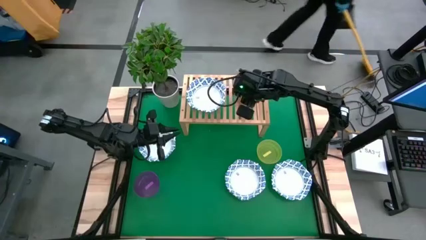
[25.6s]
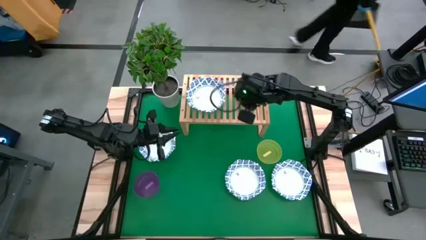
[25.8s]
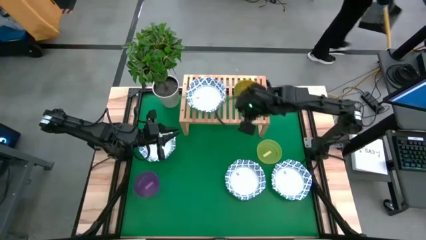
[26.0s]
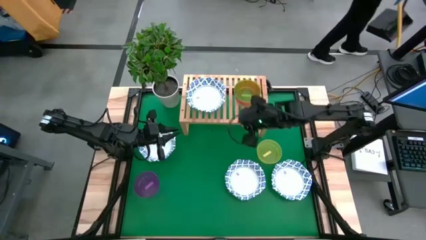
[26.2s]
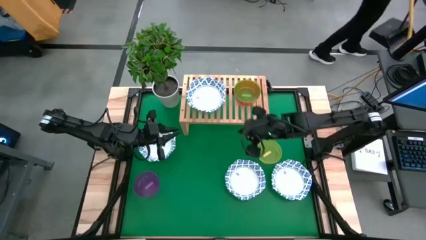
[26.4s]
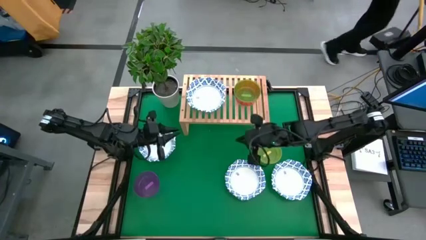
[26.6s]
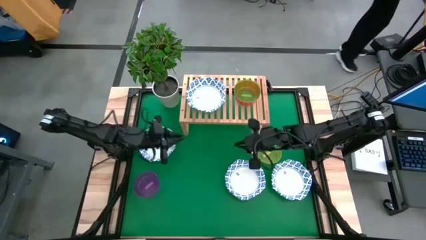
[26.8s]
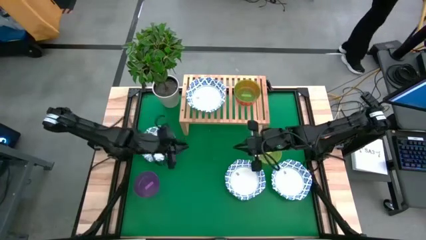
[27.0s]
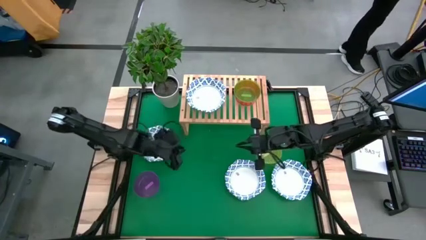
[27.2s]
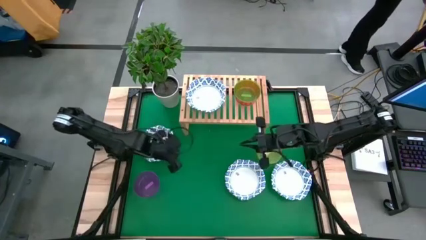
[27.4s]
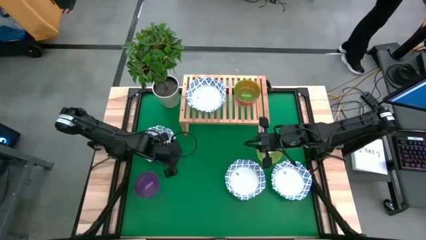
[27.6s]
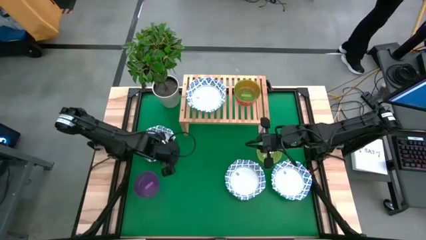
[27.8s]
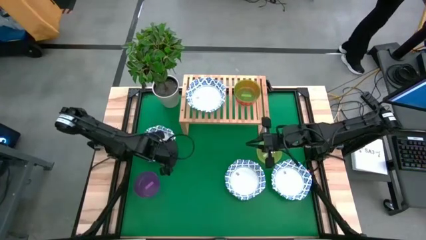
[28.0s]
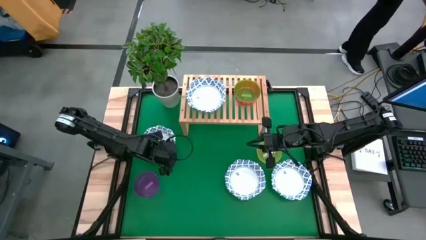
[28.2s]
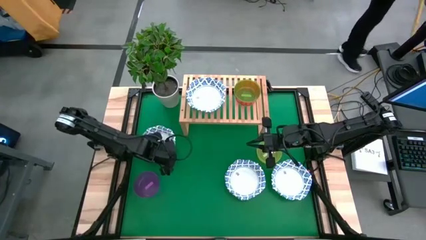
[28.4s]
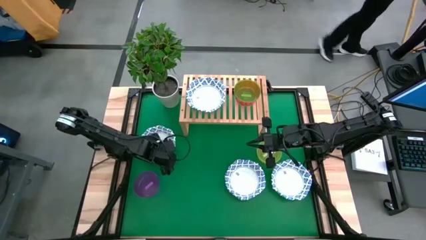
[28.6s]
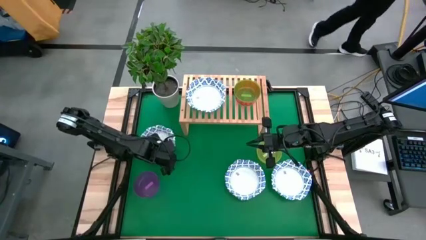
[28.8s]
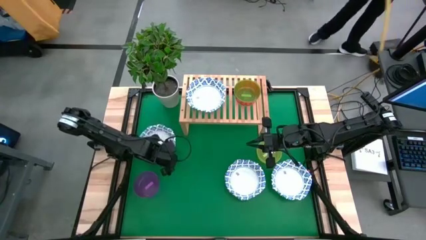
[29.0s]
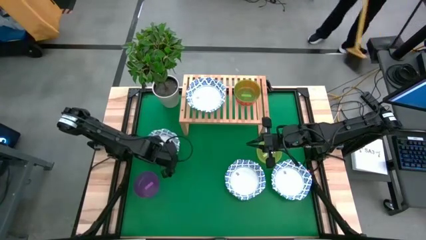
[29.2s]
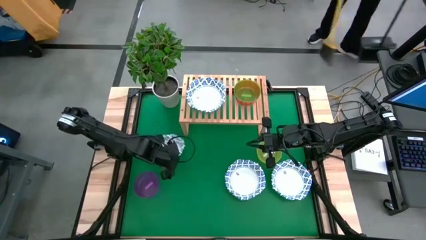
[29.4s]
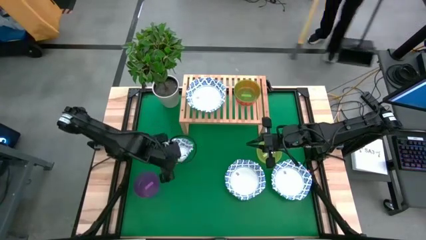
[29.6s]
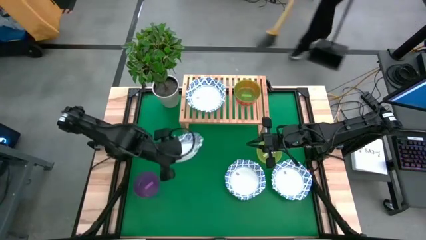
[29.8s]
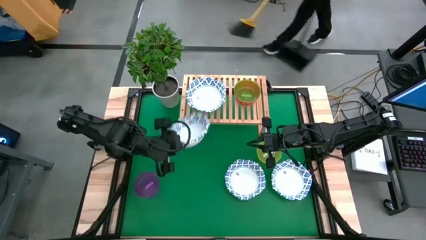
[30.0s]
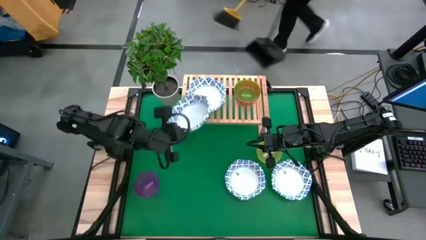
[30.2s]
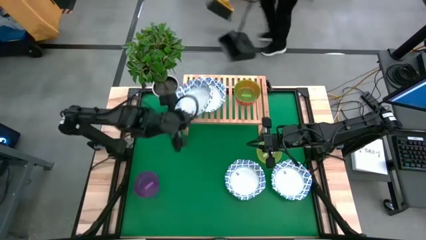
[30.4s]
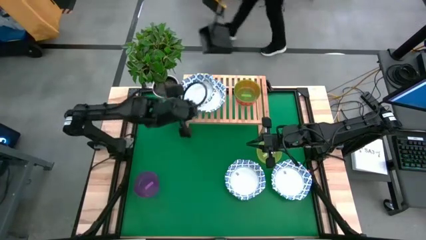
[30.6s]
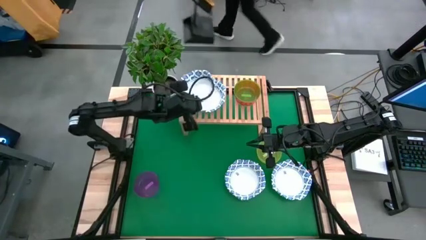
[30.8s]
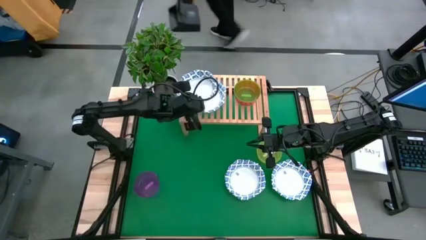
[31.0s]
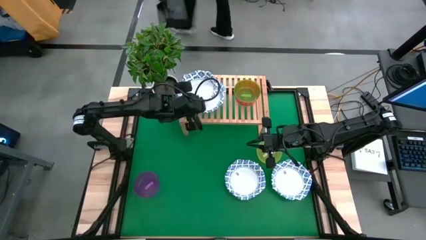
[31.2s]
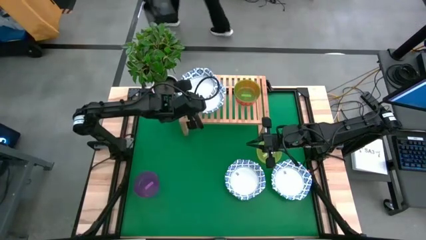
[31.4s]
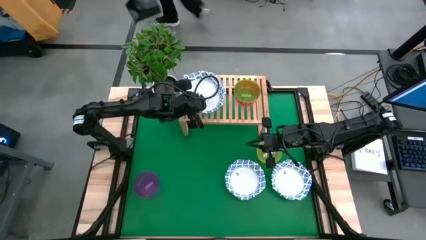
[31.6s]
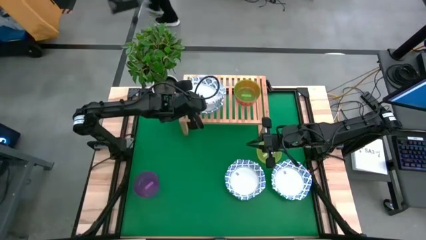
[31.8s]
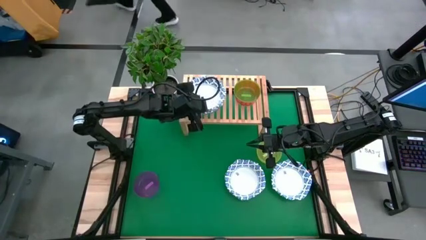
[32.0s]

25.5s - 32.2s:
Task: Place and stack bowls onto a shelf
Stack the white and blue bowl on top of the white and blue bowl

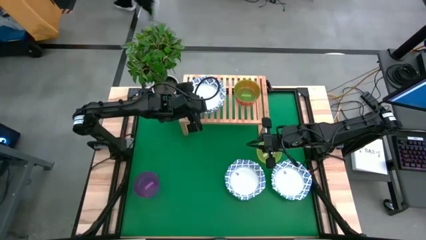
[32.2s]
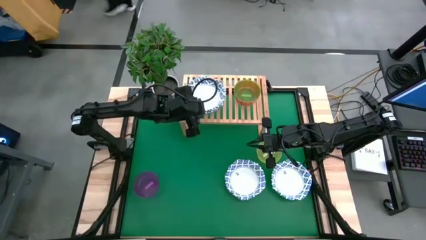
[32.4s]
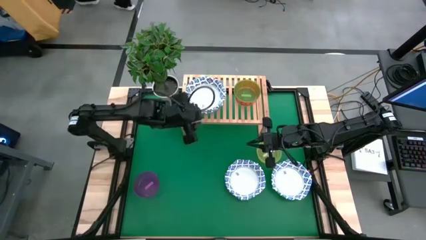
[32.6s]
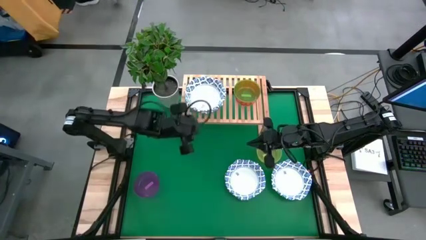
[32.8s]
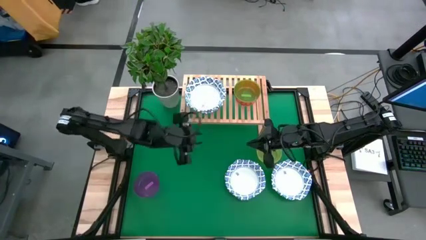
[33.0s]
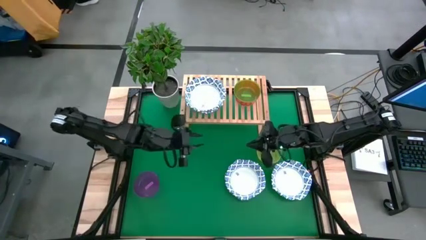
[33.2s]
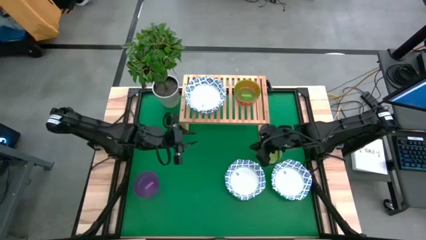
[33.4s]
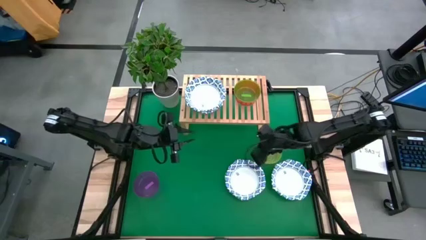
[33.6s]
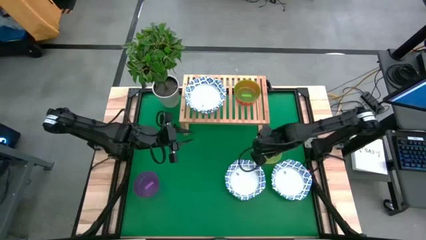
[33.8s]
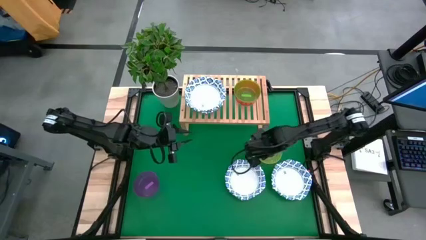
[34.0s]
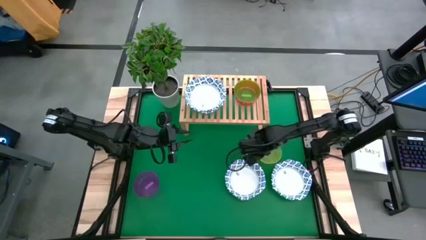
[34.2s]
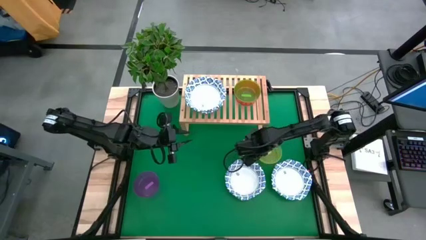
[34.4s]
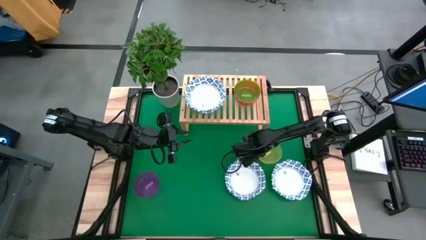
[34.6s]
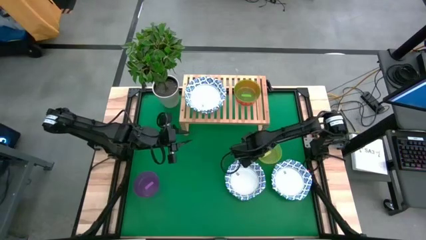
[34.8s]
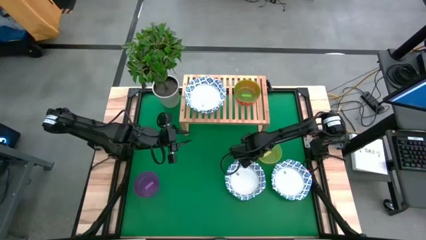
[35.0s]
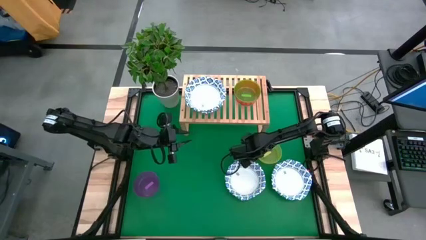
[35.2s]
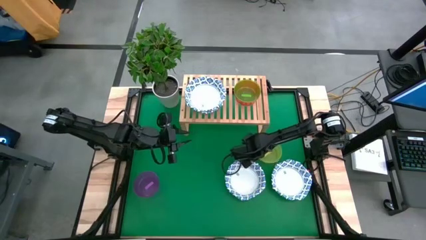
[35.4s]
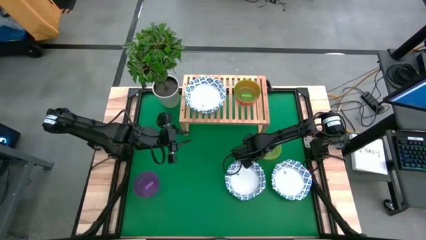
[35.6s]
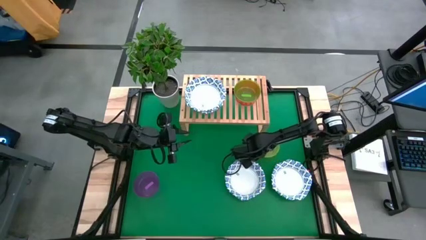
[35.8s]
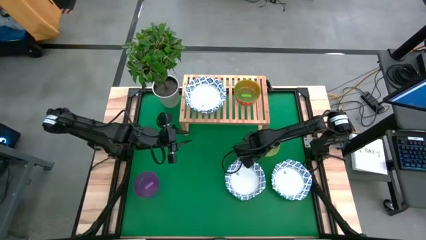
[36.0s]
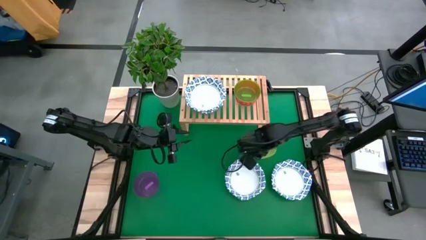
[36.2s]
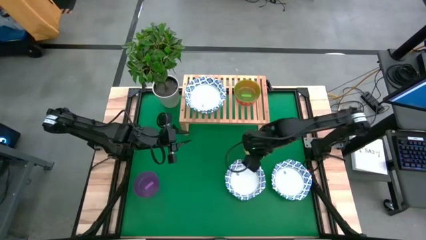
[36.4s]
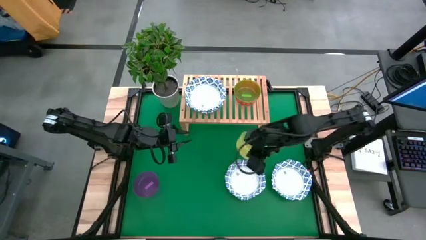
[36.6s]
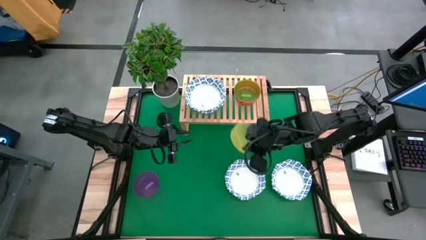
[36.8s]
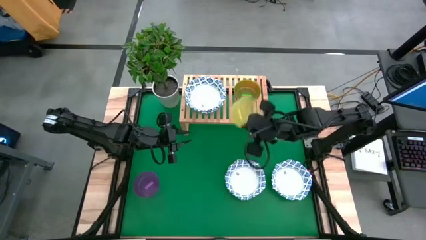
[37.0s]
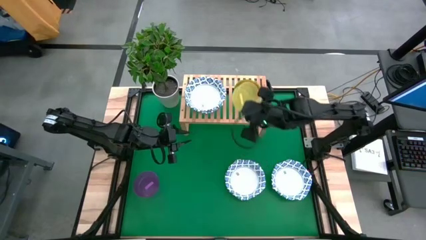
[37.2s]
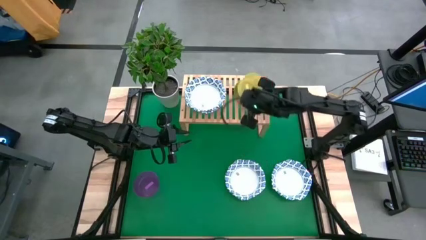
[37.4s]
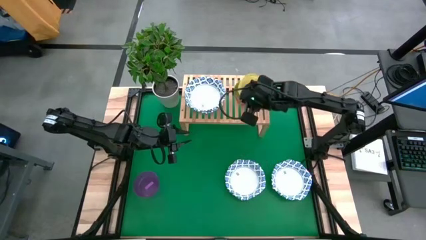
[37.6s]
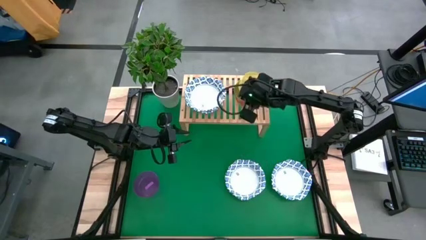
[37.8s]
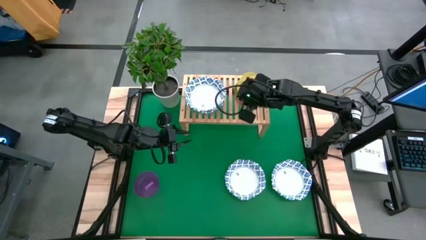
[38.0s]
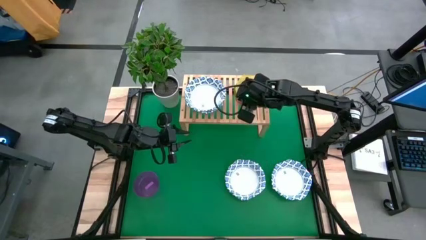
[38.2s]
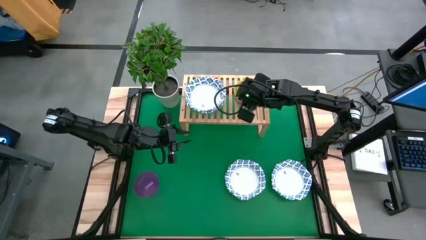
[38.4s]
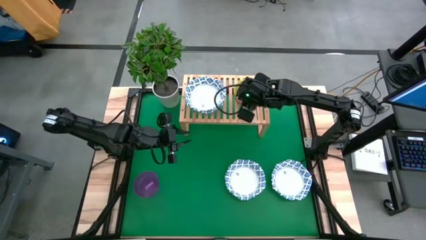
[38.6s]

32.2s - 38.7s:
Stack the yellow bowl on top of the green bowl

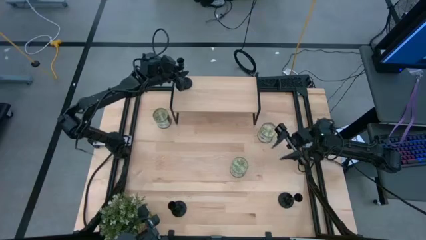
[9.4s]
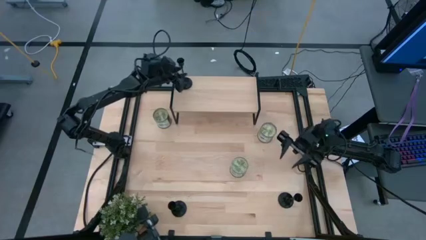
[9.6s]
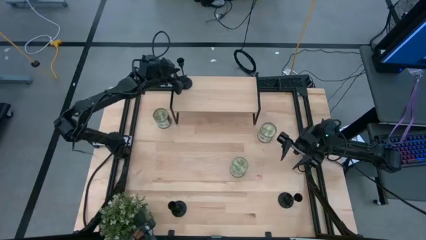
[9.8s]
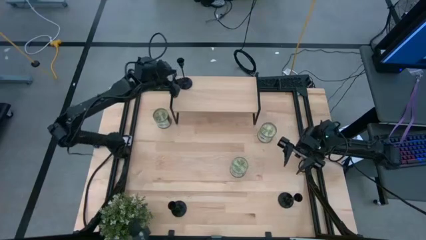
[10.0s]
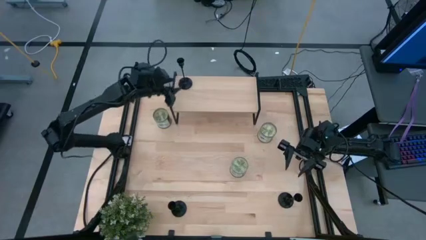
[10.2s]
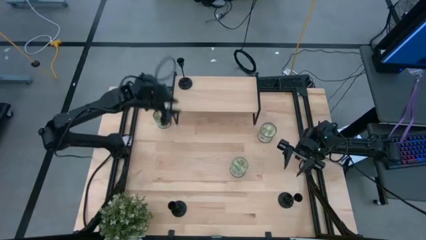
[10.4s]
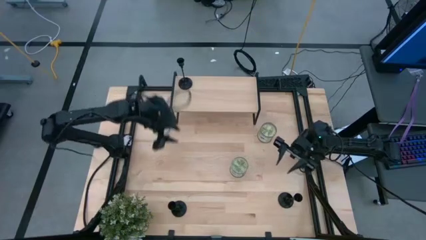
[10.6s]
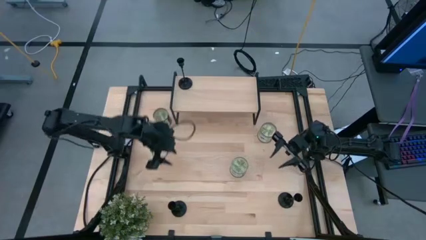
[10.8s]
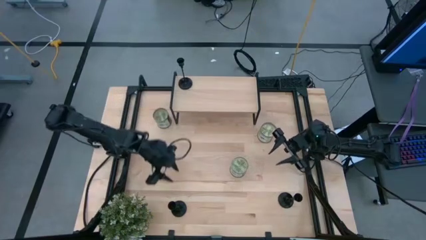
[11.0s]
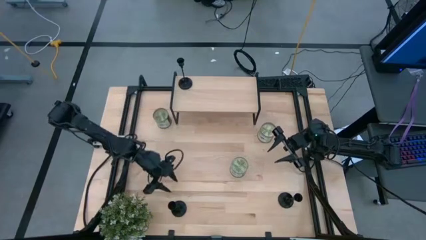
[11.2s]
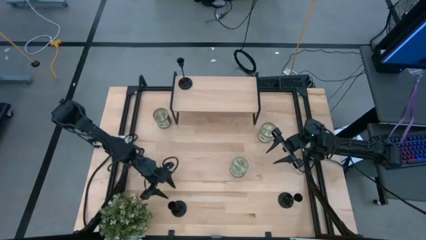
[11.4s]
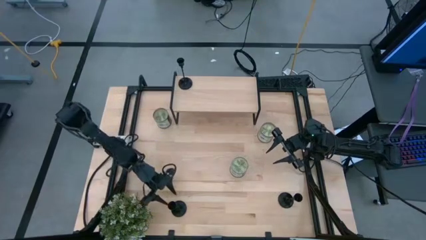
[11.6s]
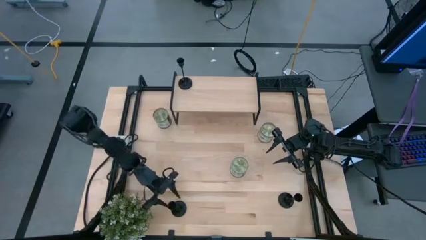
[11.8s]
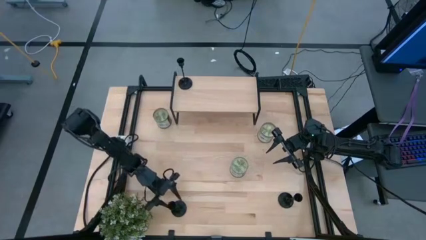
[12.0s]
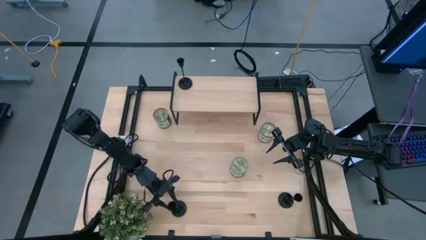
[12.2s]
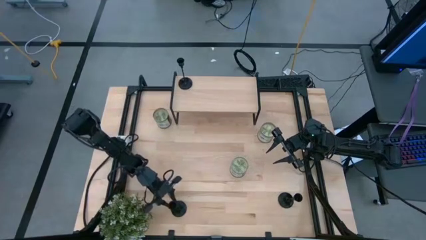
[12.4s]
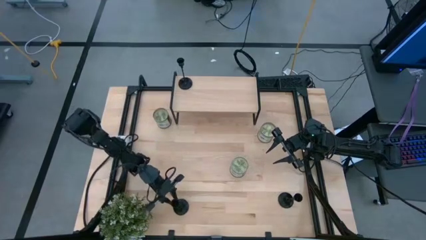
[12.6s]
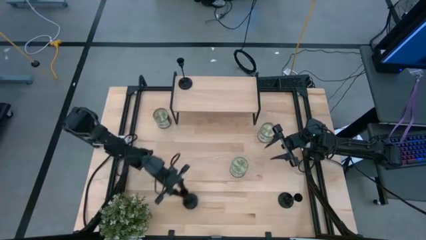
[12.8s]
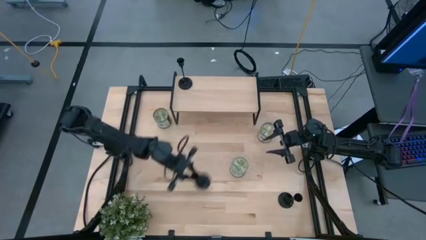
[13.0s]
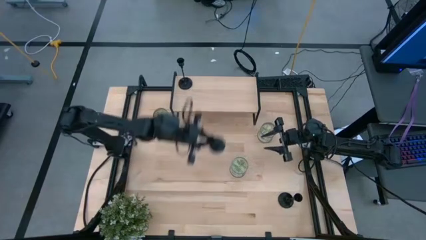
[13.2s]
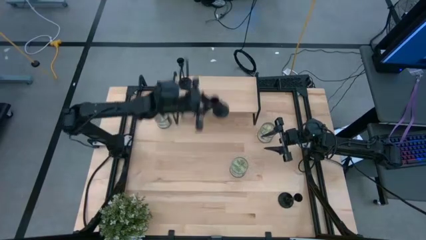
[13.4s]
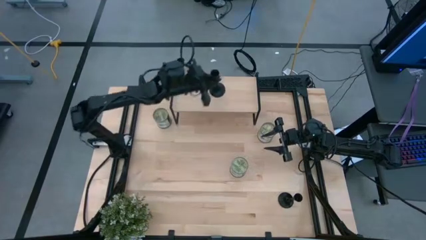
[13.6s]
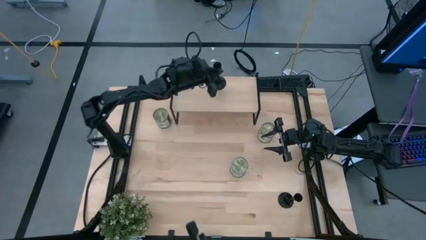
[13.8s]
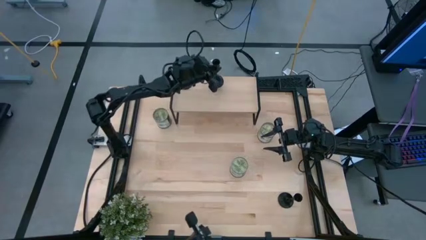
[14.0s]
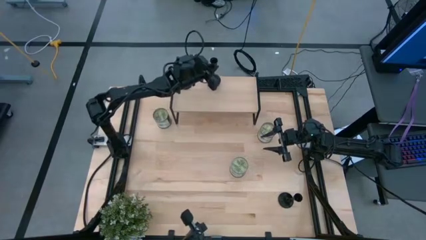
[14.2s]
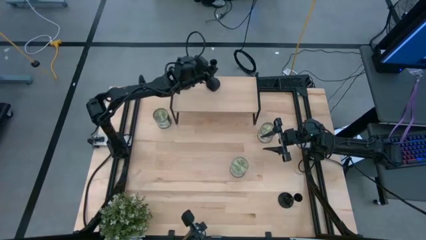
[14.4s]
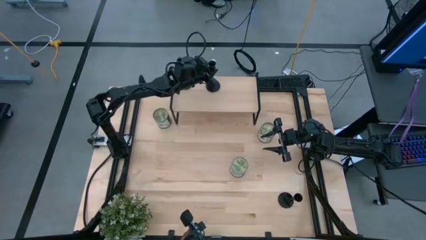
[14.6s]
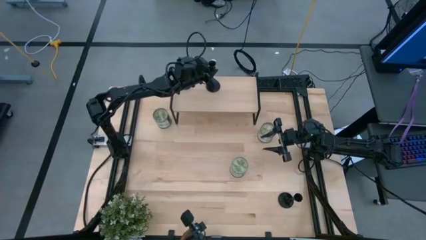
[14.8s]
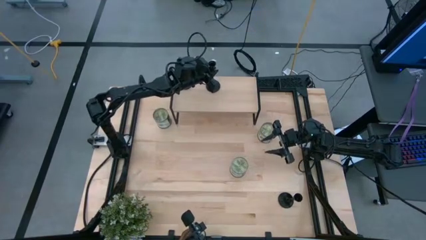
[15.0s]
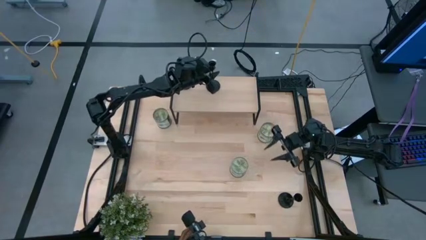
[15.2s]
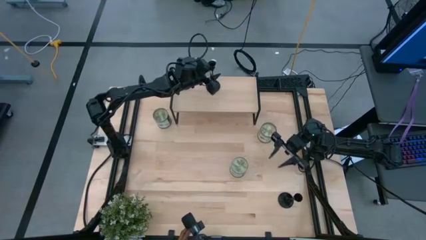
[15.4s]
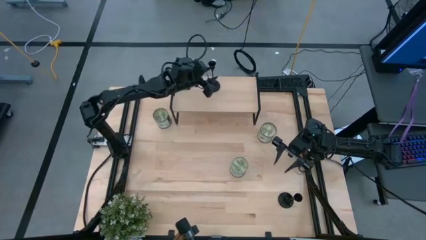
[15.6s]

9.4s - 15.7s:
Task: Pick & Place candle stick holders
Put the left black candle holder on the shelf
